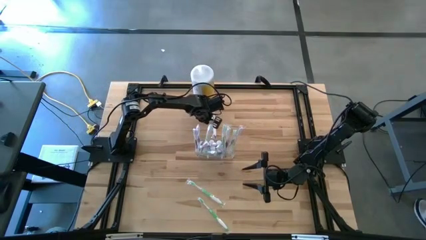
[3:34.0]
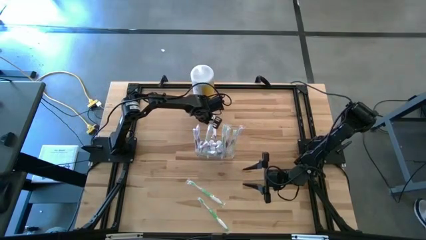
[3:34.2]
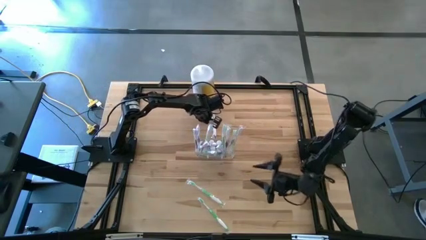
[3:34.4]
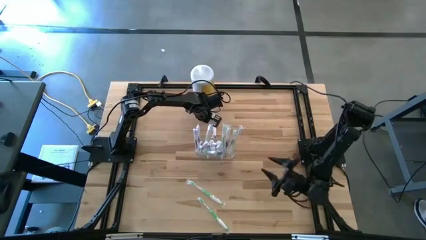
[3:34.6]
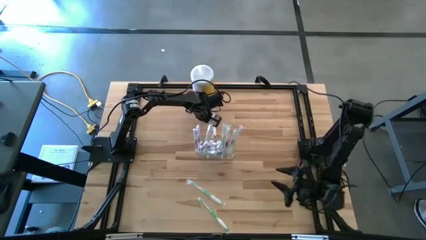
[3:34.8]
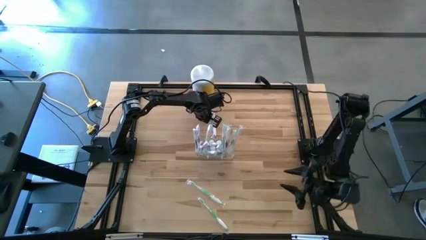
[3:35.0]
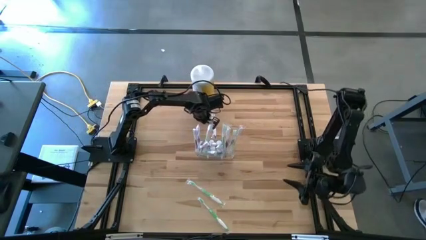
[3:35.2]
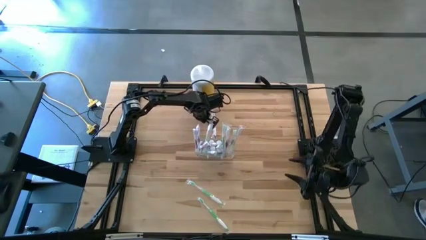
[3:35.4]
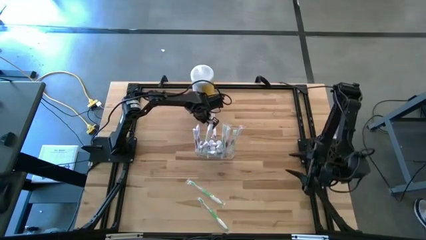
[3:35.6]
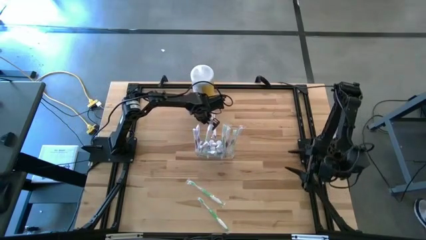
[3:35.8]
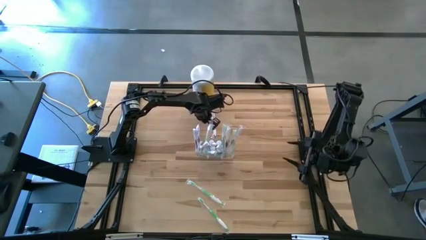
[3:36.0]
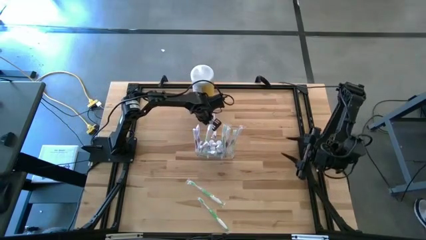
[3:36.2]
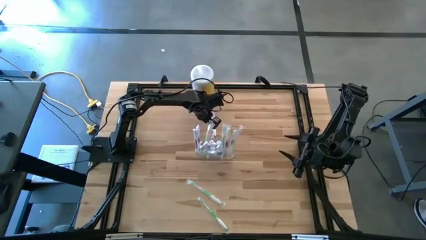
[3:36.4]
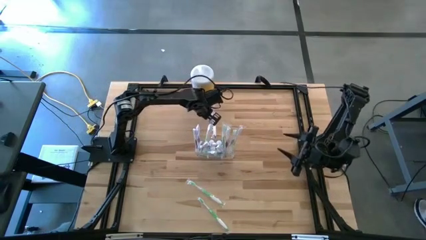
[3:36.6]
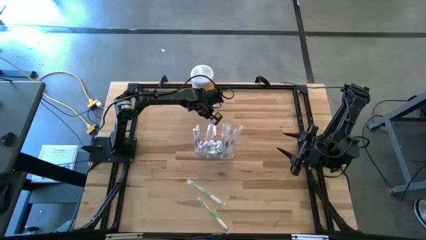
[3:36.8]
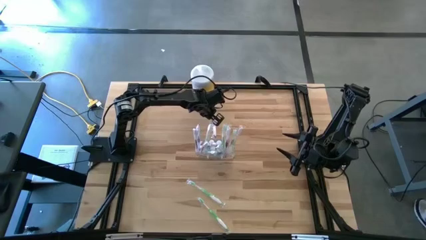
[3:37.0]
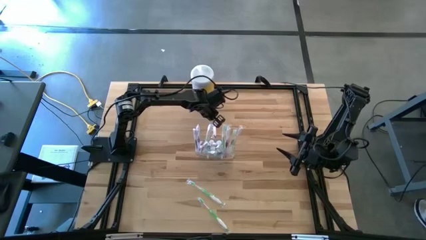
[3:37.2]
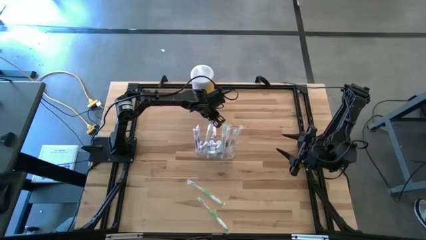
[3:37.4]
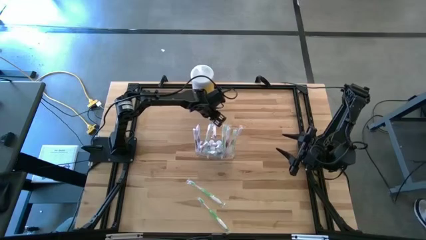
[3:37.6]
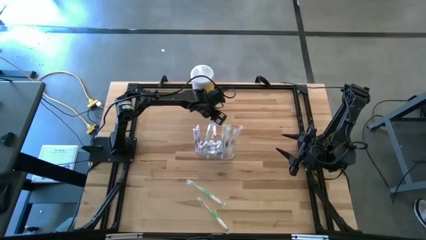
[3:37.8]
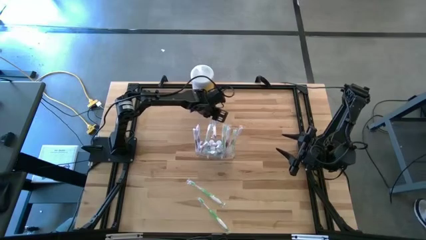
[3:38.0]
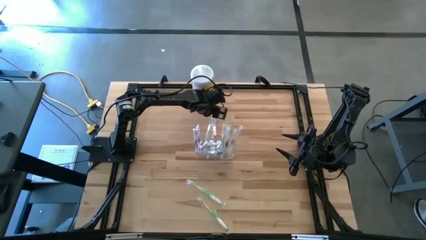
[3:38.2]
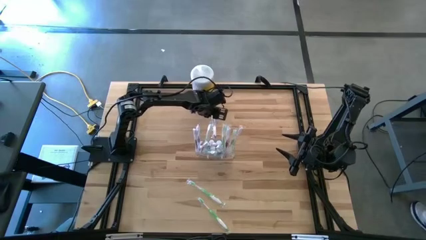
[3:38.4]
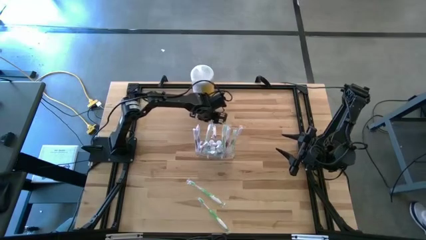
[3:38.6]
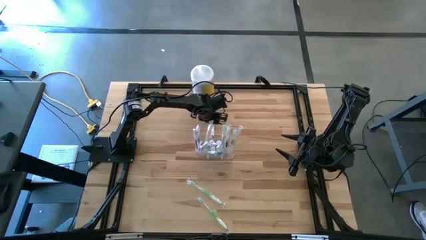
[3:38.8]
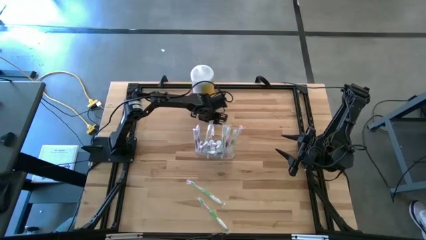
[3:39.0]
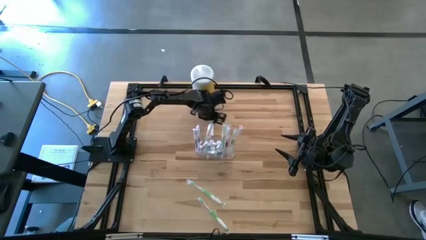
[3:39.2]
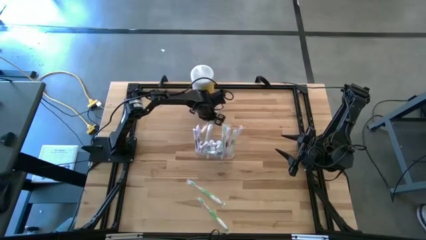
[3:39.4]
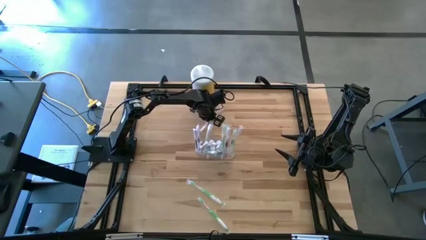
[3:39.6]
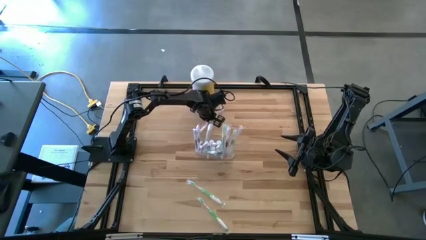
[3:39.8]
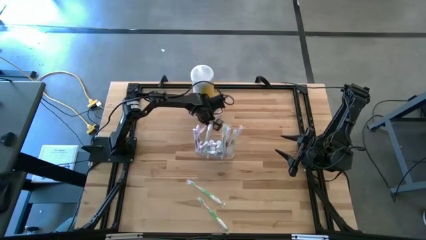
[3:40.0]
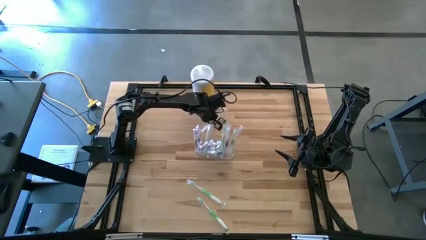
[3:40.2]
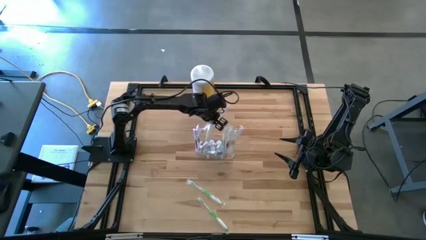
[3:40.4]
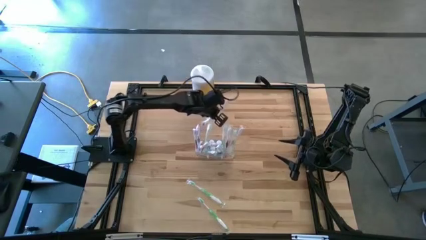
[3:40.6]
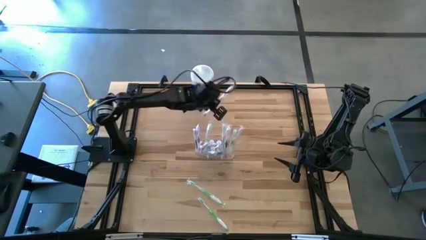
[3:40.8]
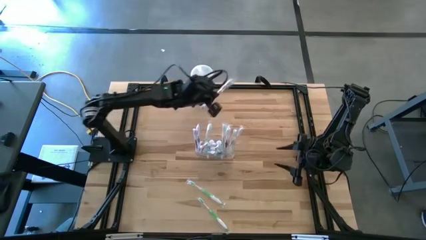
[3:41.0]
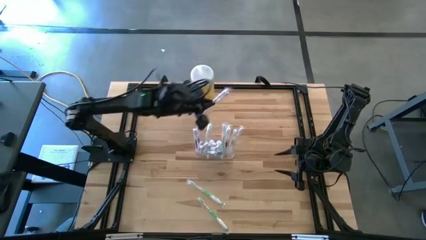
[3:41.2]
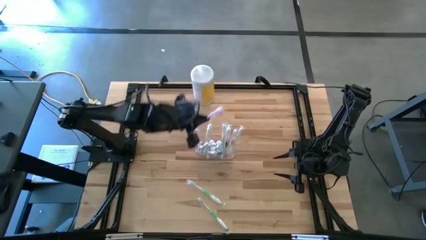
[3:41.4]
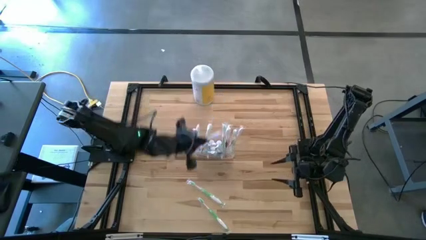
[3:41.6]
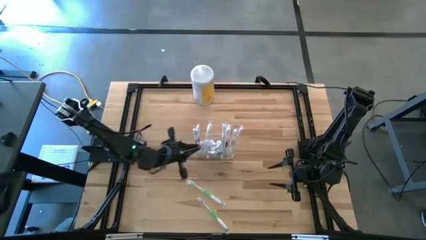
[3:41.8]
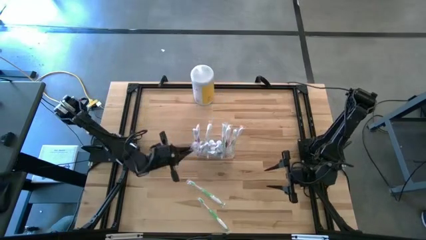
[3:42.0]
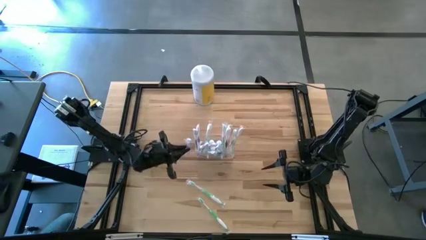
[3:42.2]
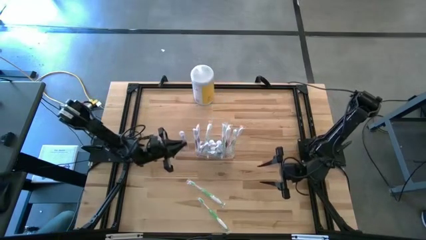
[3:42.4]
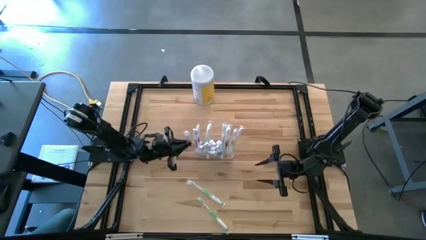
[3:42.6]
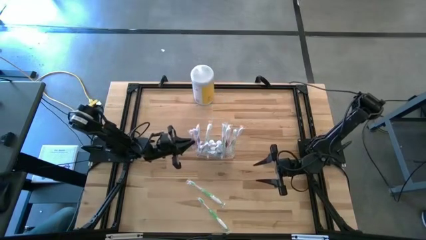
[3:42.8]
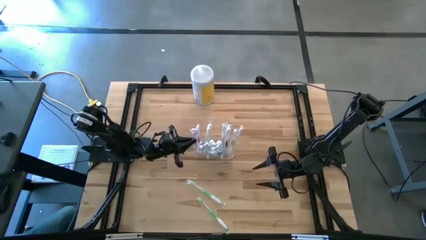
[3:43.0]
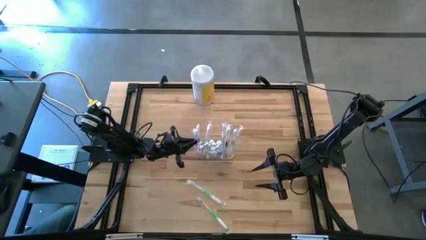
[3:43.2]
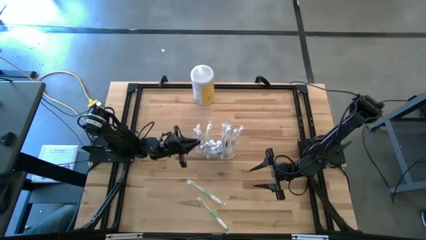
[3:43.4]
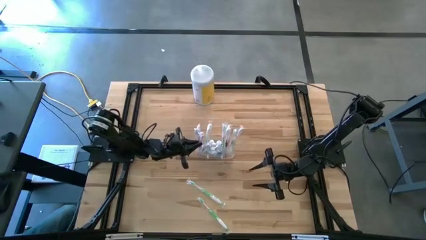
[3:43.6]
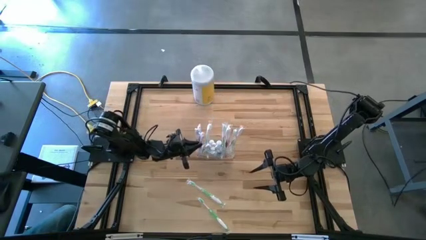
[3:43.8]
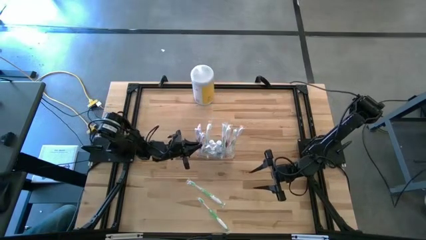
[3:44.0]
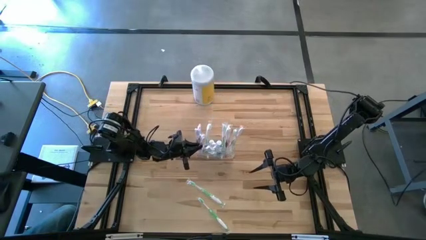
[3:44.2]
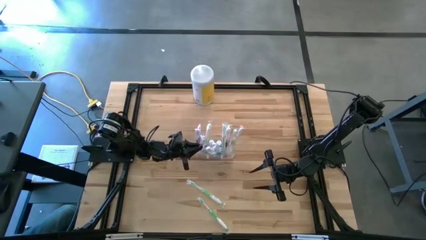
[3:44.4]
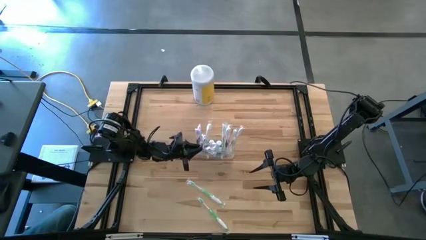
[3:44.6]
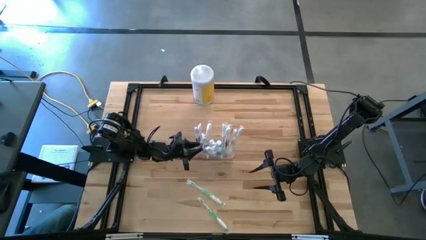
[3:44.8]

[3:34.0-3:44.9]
Task: Pick & Place toothbrushing station
Put the purple toothbrush into the transparent organizer

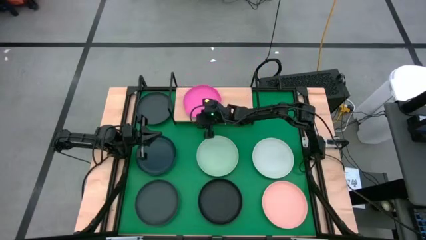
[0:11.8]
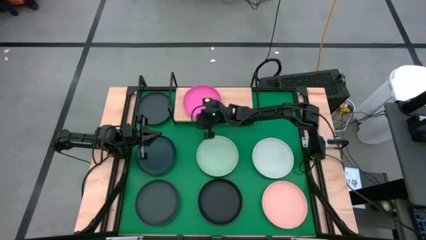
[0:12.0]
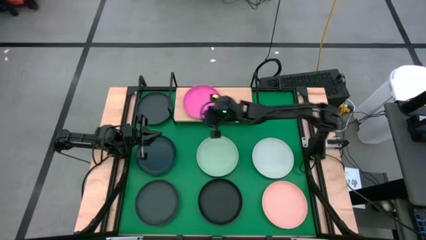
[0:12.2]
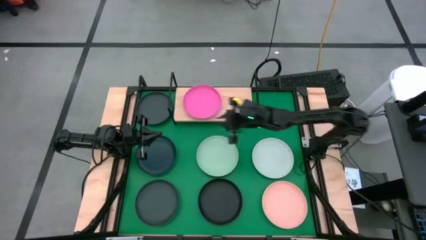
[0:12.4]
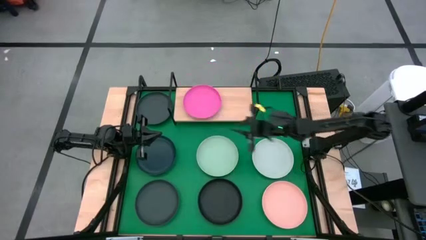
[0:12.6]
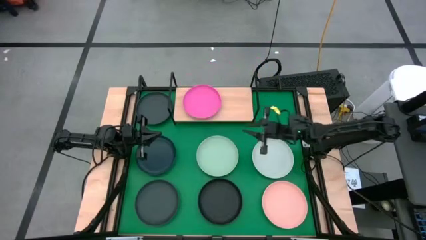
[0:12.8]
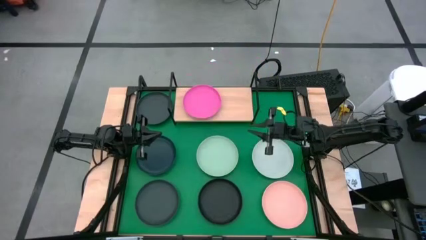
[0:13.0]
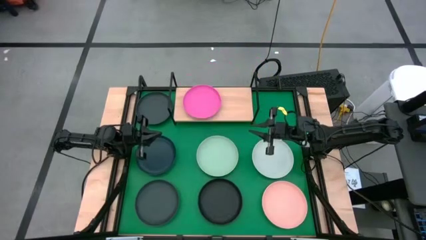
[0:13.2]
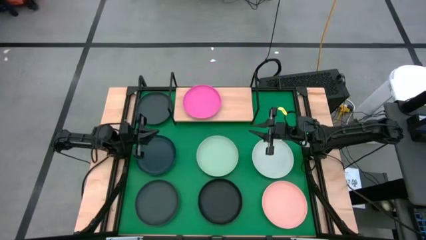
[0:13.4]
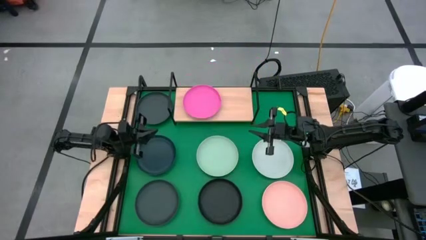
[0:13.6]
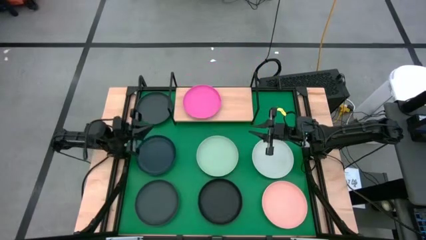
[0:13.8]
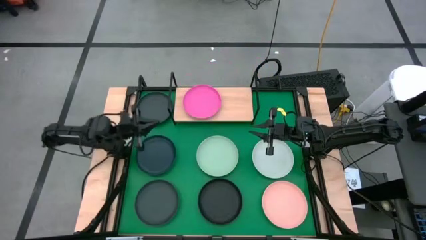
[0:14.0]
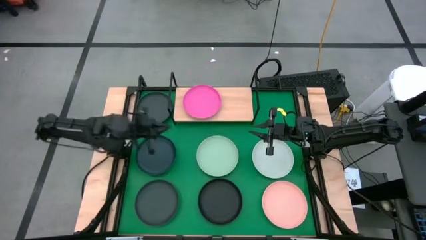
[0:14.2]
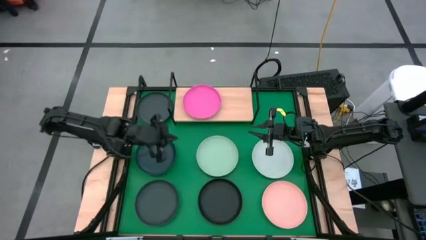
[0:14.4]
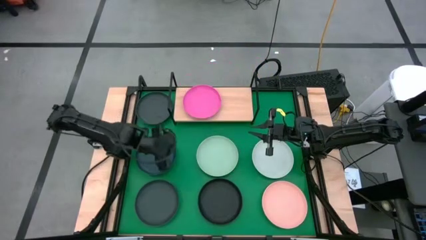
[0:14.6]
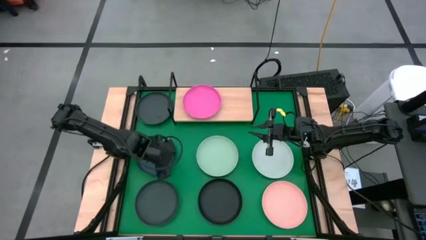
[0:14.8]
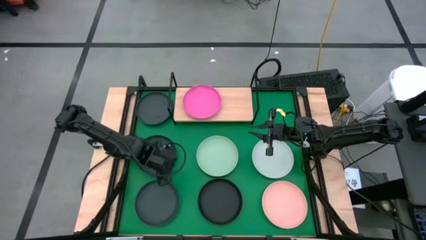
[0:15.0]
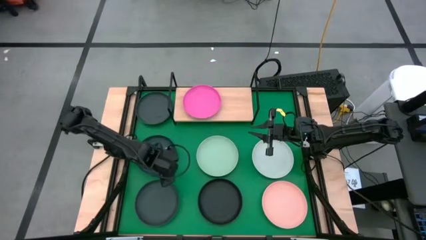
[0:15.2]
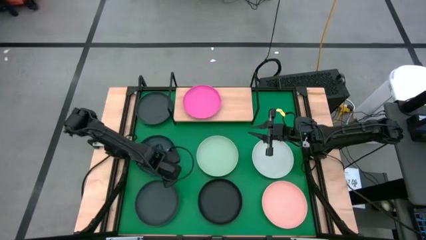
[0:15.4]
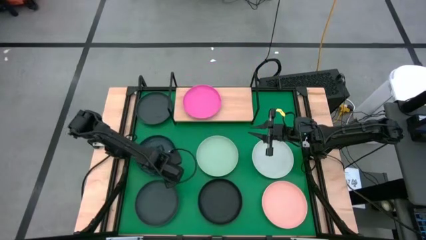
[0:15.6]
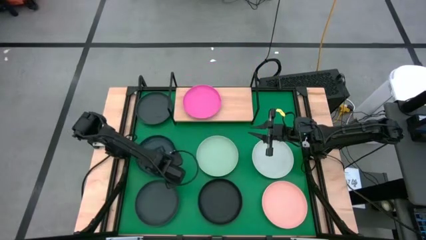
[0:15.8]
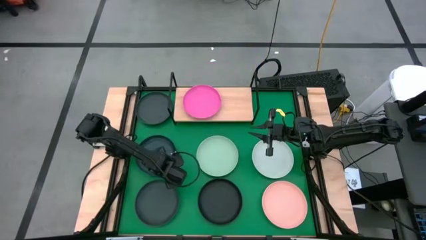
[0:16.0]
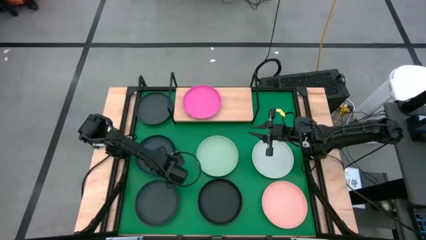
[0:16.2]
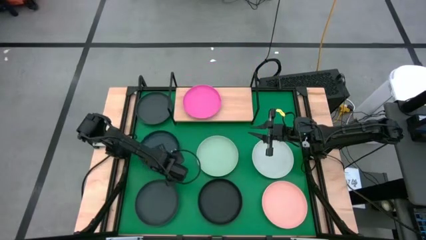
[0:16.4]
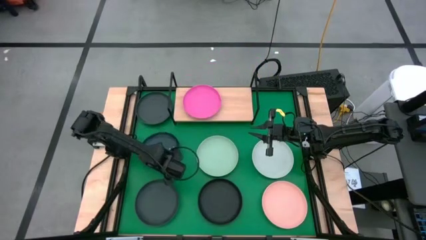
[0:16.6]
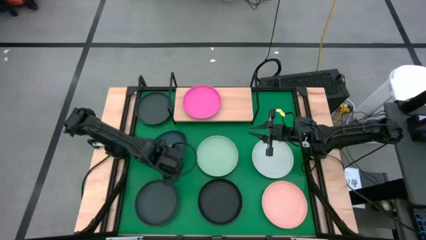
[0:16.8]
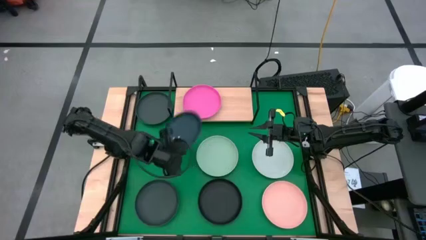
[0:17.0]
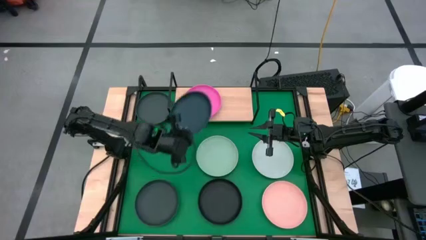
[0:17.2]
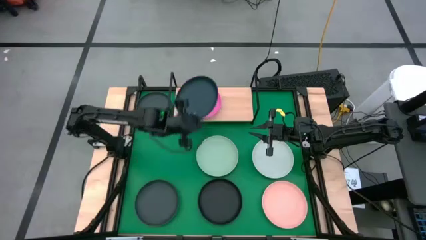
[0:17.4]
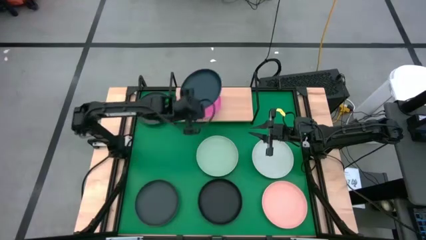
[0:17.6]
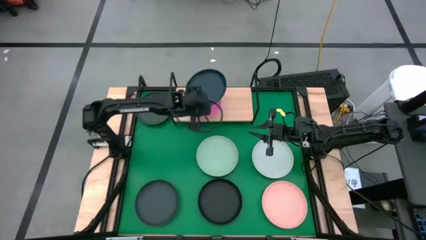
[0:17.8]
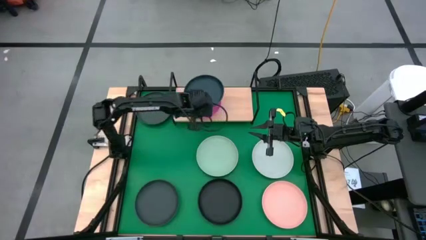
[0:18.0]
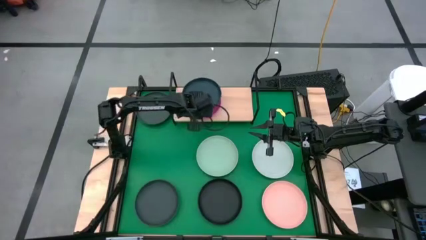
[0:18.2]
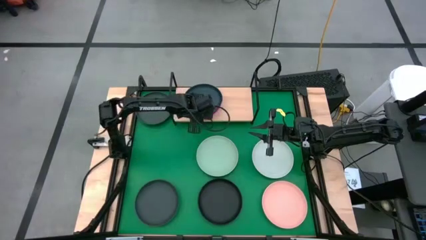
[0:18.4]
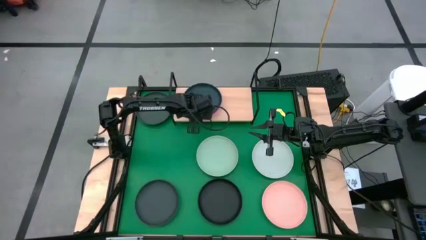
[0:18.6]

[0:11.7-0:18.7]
Task: Place and stack plates onto a shelf
Stack the dark blue plate on top of the pink plate on the shelf
